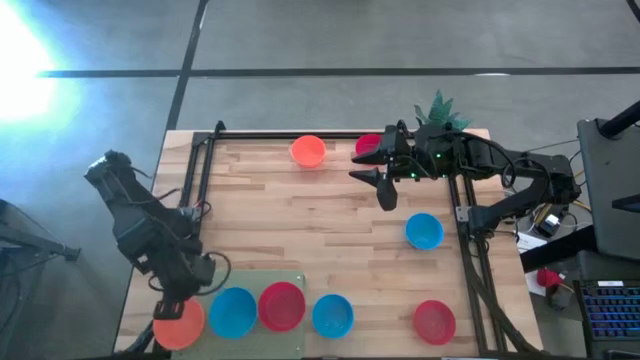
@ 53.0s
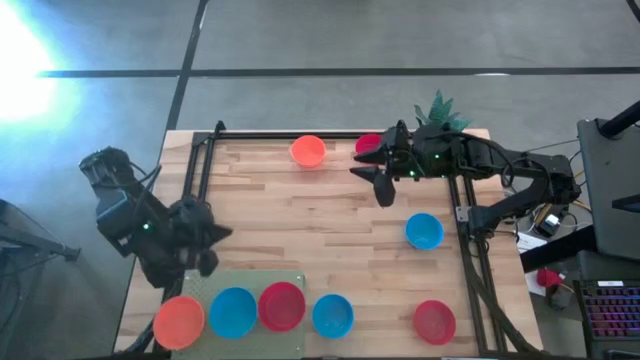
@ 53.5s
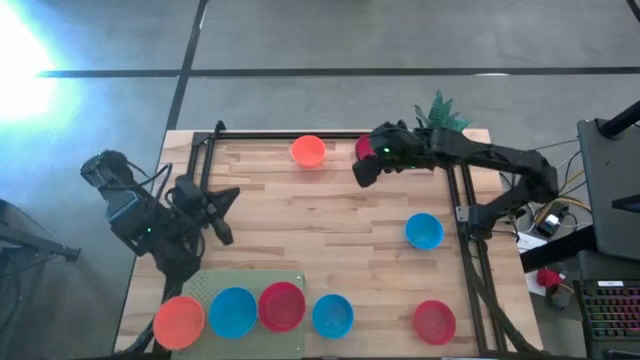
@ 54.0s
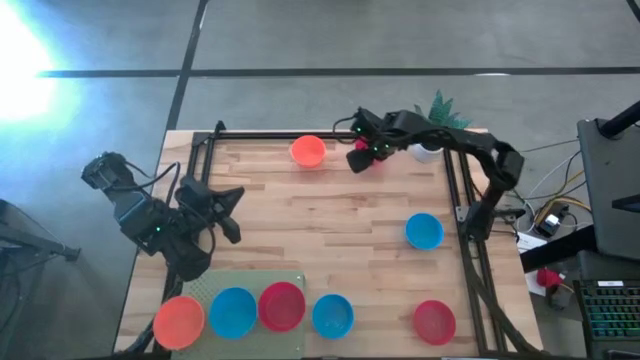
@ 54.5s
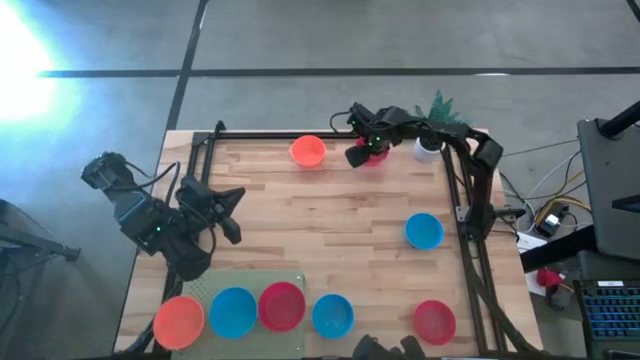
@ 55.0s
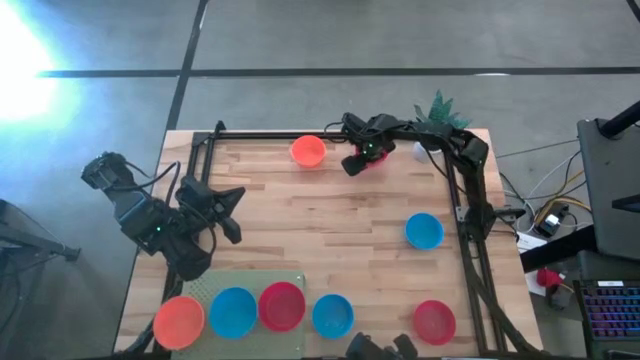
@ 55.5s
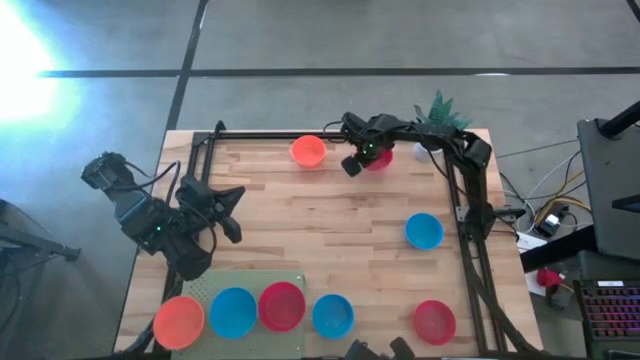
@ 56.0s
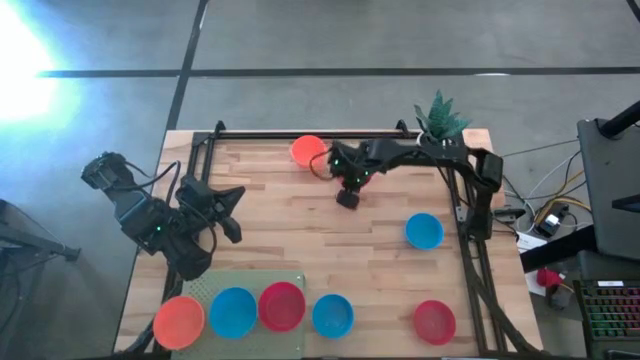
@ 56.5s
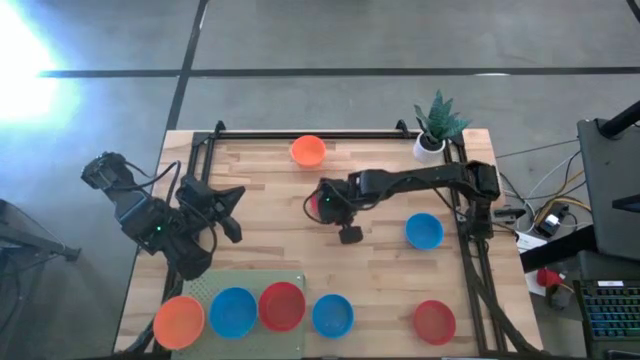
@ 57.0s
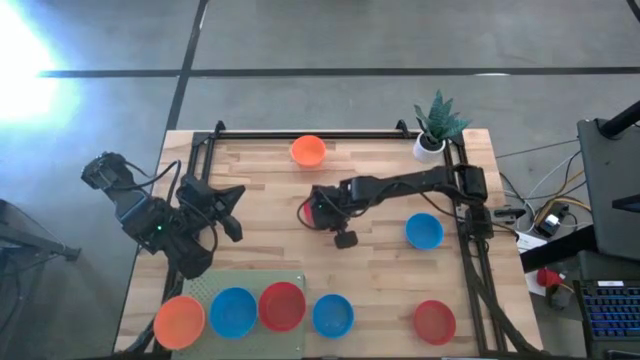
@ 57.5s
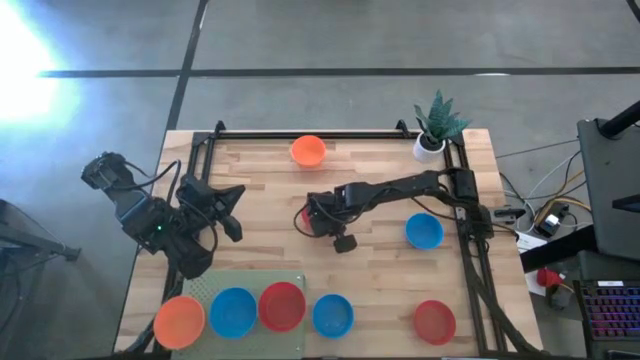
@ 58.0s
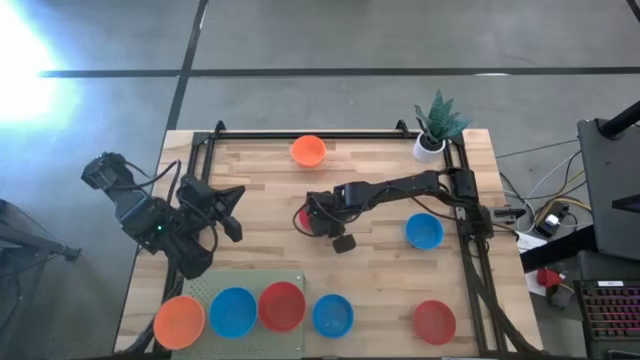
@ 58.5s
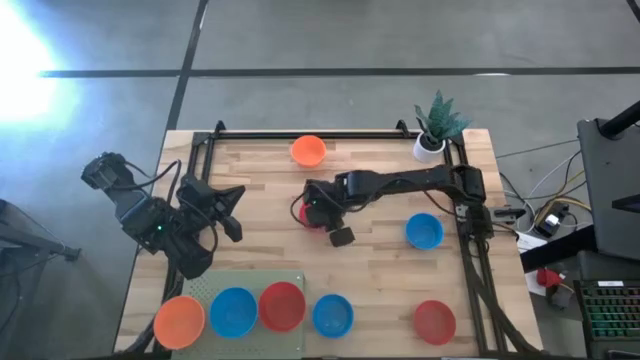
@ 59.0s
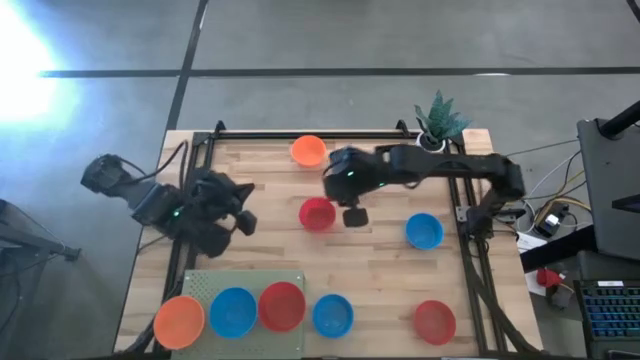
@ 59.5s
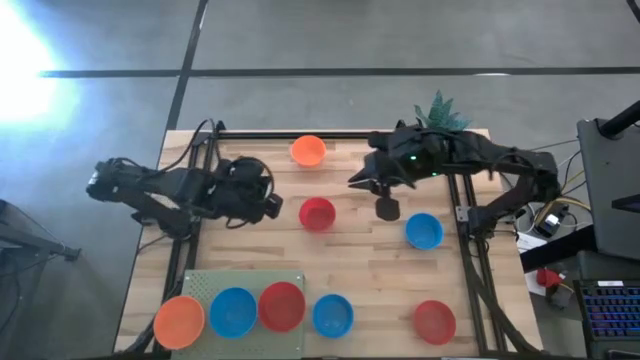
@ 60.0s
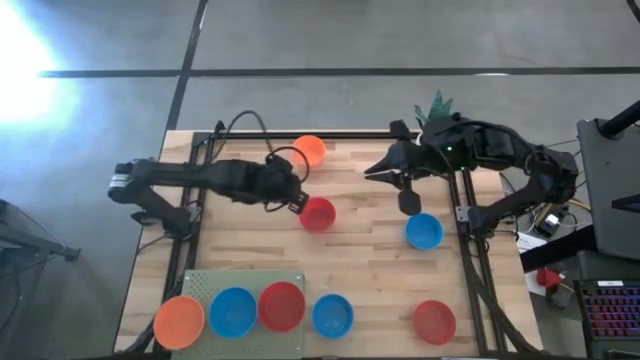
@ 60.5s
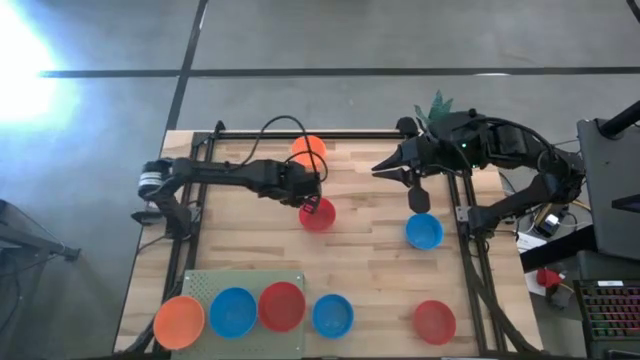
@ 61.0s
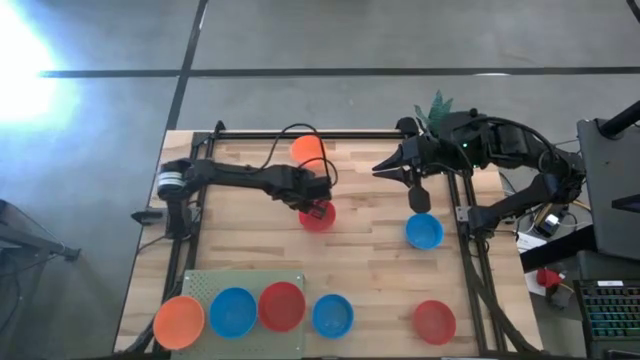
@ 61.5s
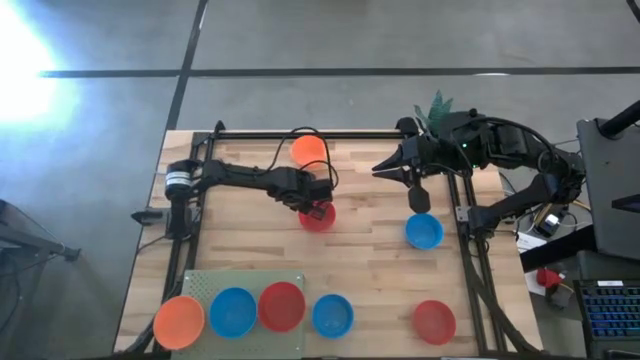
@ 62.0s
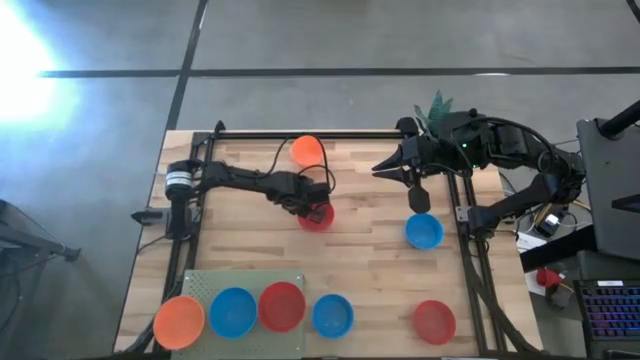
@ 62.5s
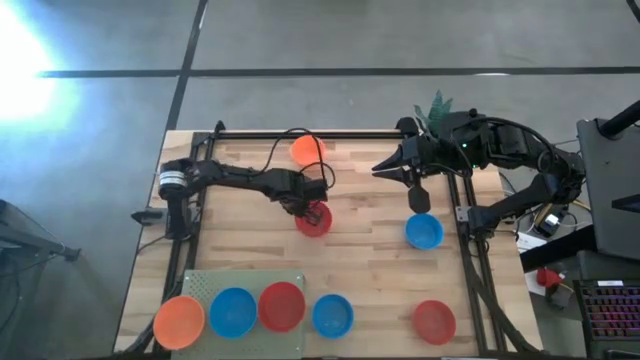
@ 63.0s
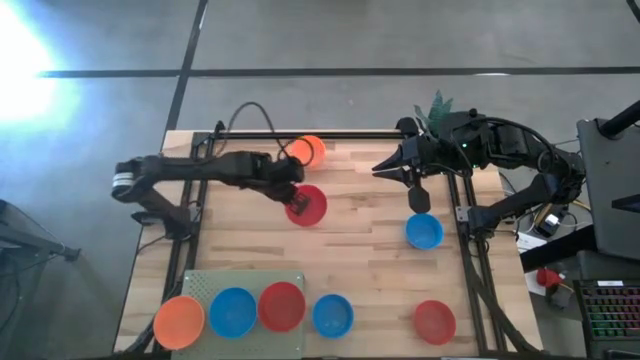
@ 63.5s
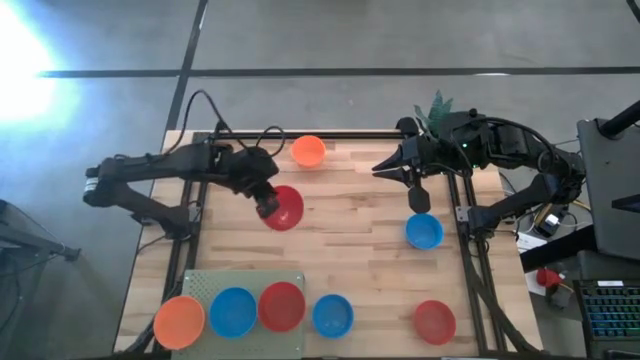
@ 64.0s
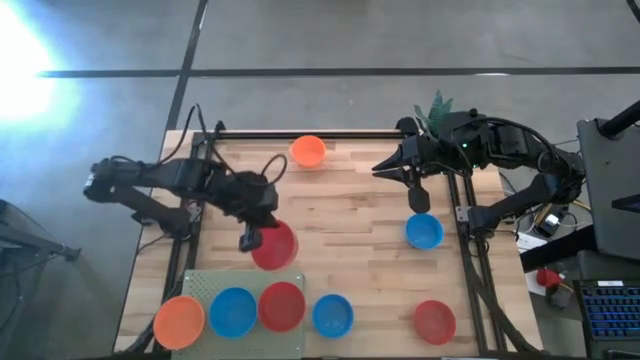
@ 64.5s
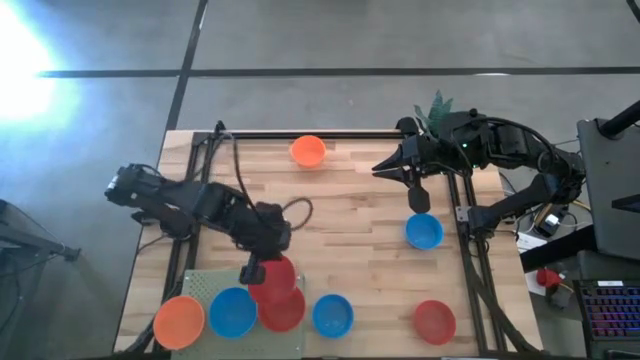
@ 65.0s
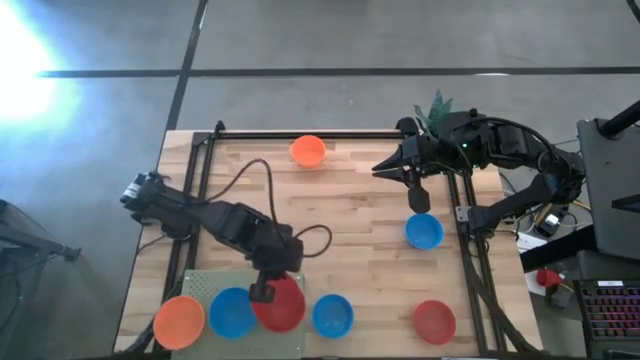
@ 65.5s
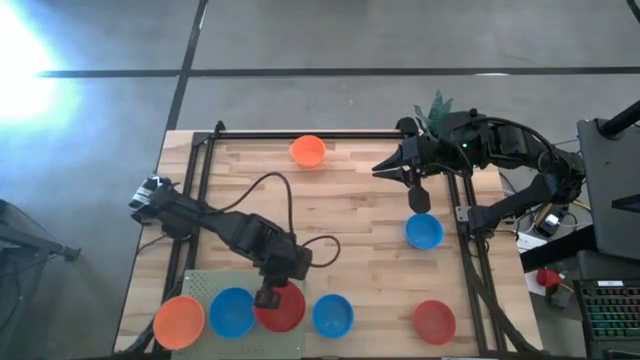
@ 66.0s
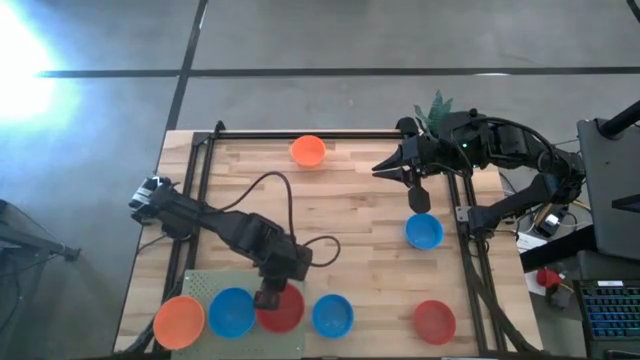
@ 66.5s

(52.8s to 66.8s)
Task: Pick & Place Mini bowls
Stack the top red bowl on the red bowl on the shelf

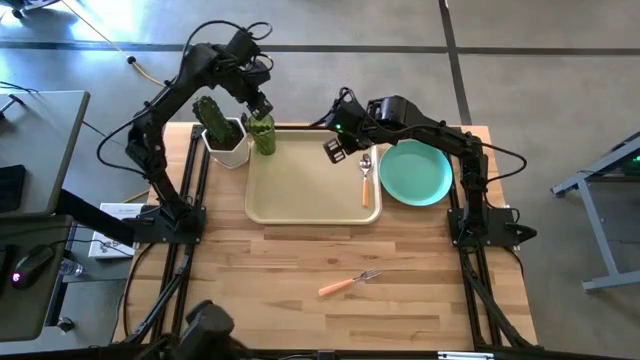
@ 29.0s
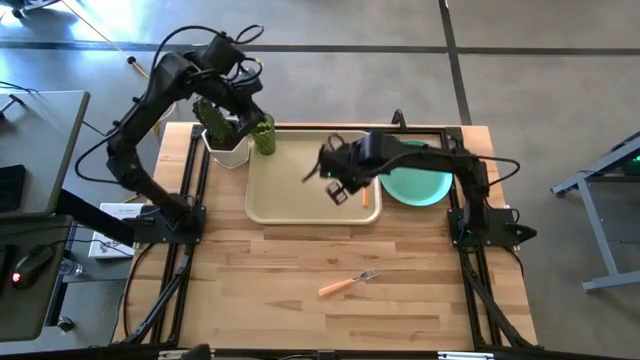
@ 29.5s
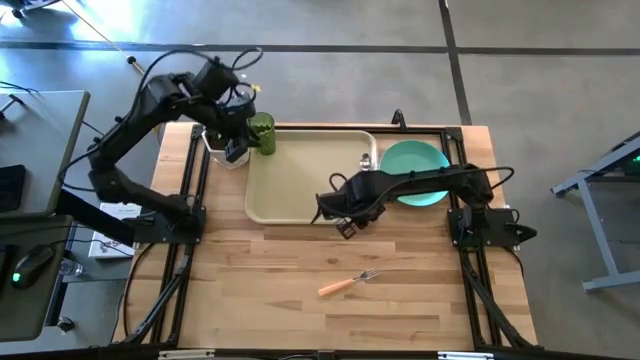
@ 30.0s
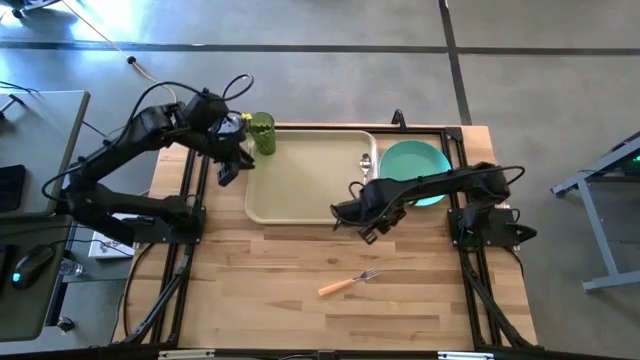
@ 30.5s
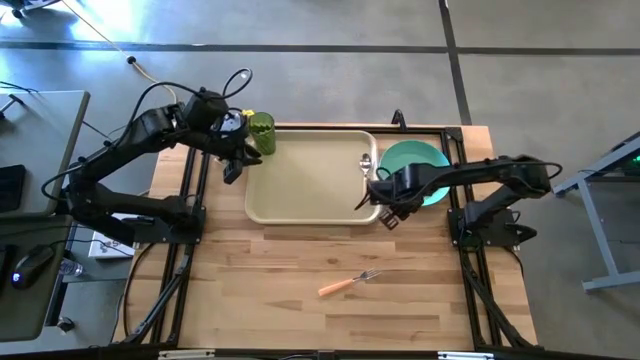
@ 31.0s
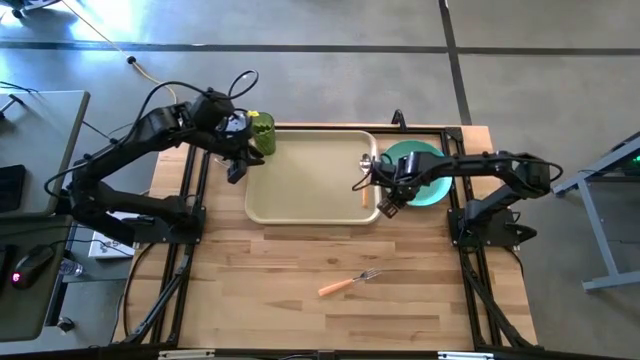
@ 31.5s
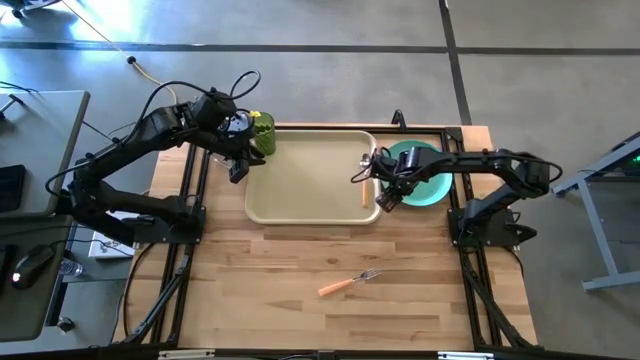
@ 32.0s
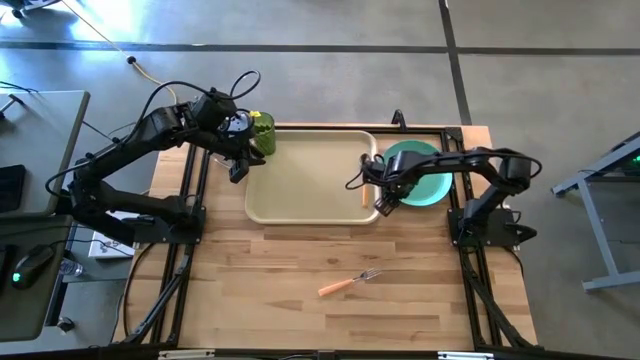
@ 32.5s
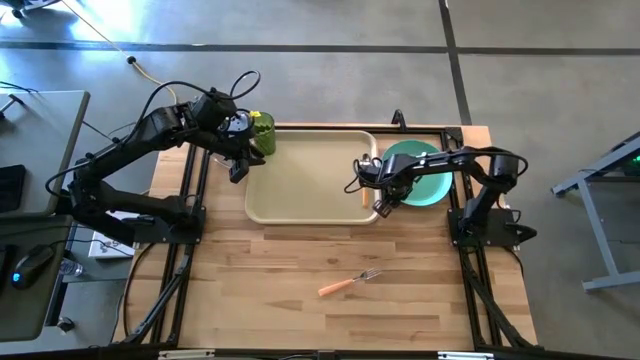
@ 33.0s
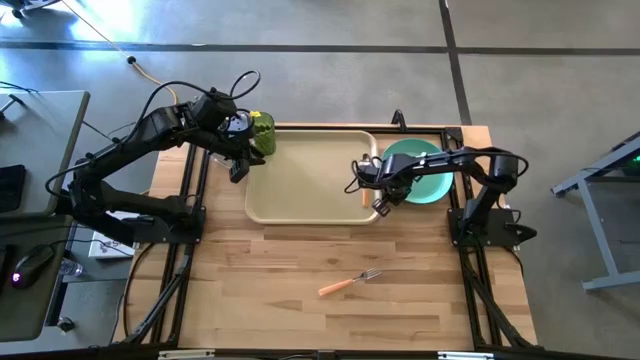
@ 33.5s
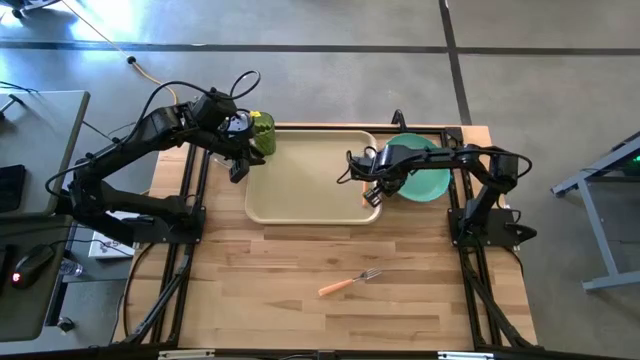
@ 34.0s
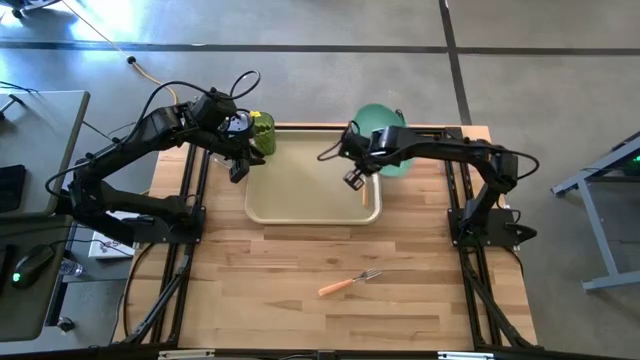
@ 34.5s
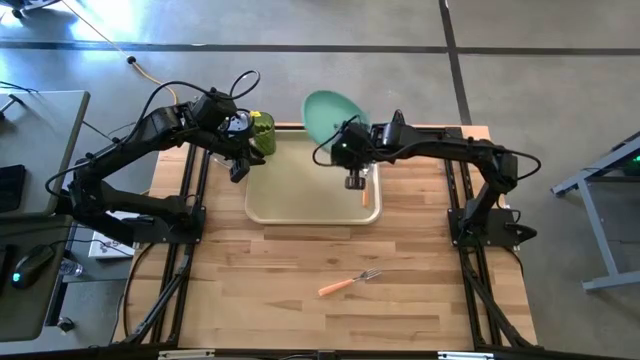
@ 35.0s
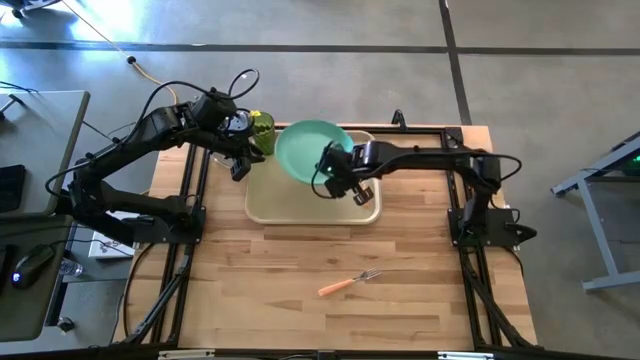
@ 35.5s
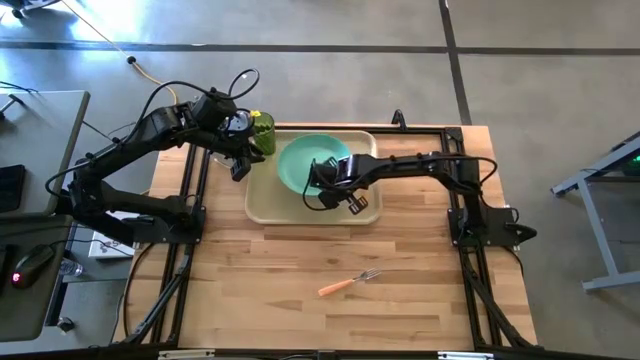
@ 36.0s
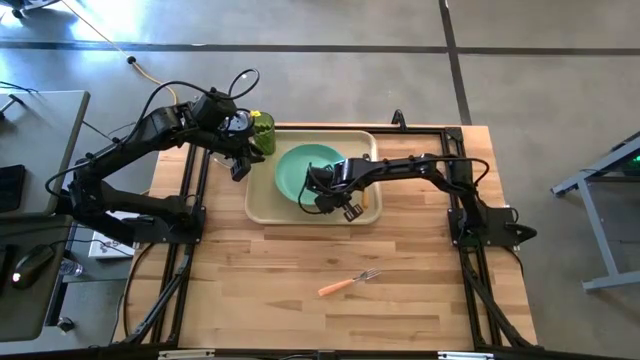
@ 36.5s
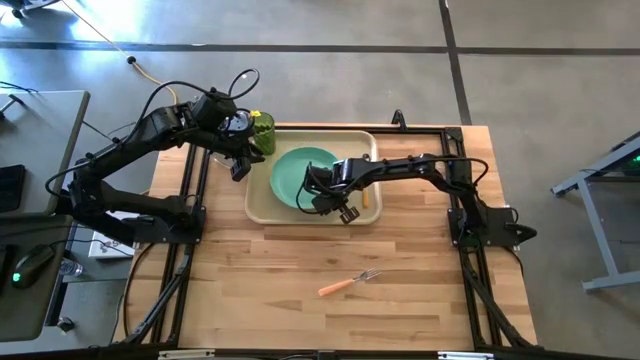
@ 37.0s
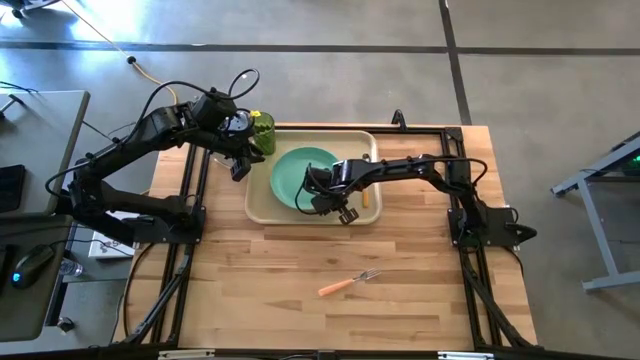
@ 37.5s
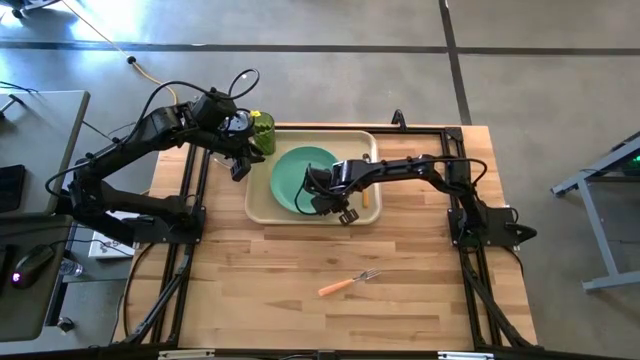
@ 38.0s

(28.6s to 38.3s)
Task: Pick and place plate/cup/fork/spoon on tray
Put the blue plate on the white serving tray
